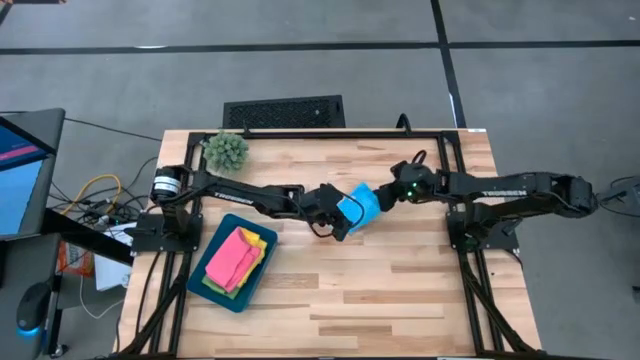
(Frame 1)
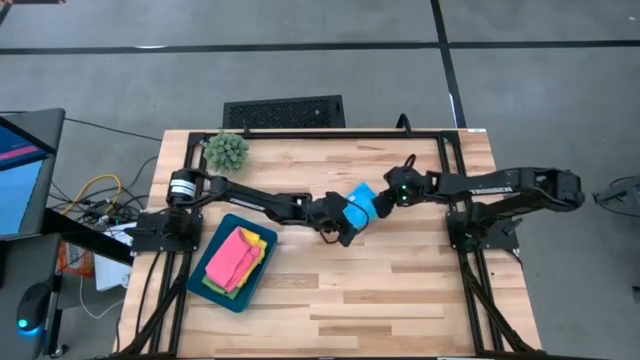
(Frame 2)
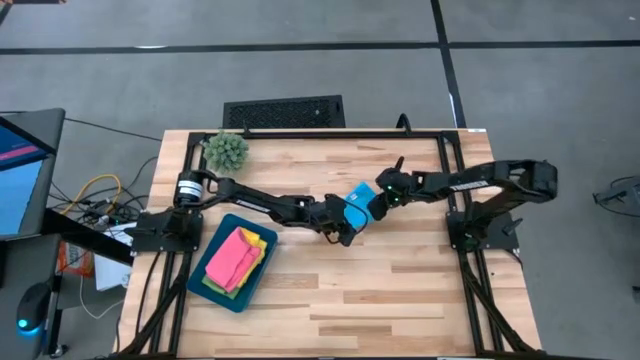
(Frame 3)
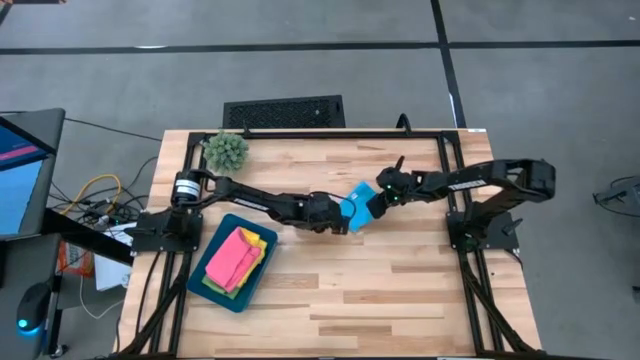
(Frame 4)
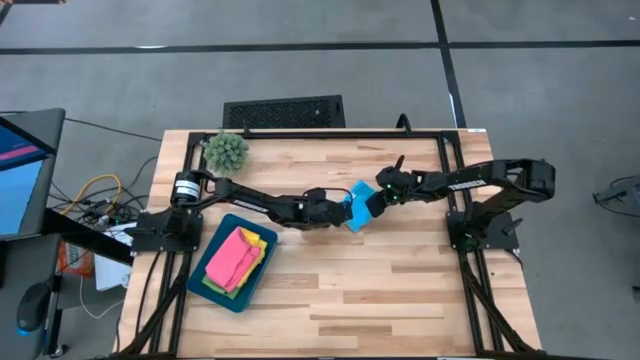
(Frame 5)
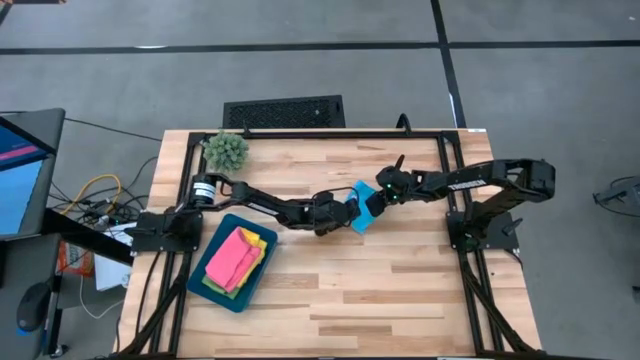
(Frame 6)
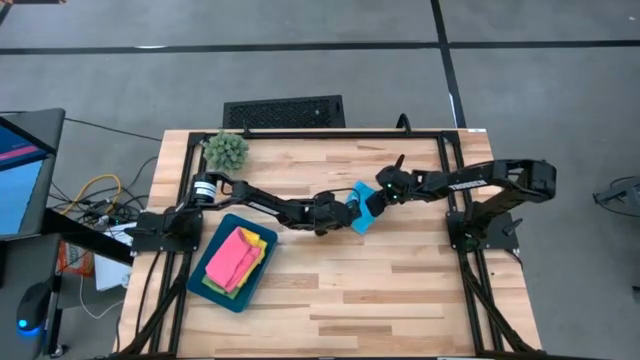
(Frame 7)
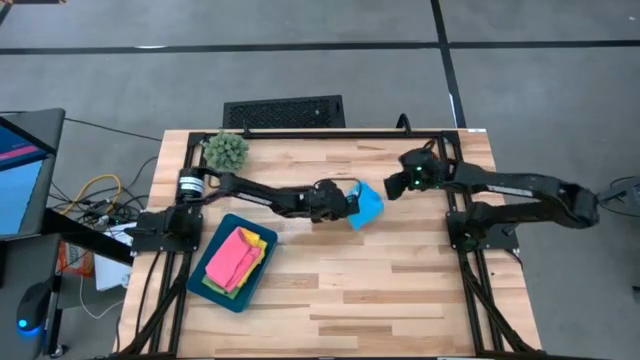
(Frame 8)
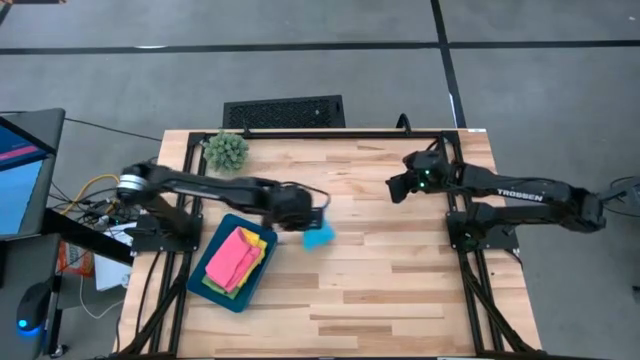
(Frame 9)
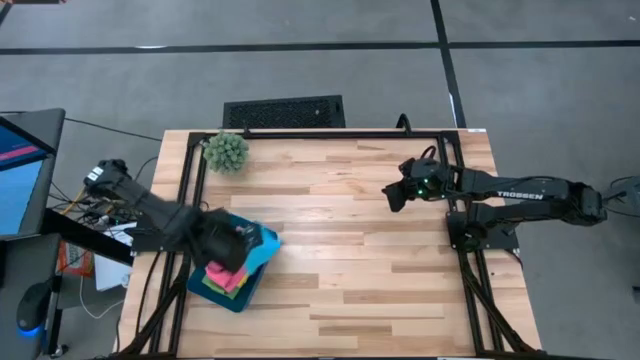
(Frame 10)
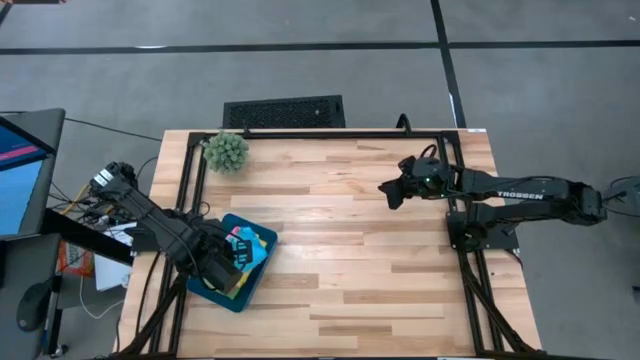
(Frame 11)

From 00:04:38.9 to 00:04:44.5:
Task: Fold microfiber towels
Put the blue microfiber towel into the blue bin

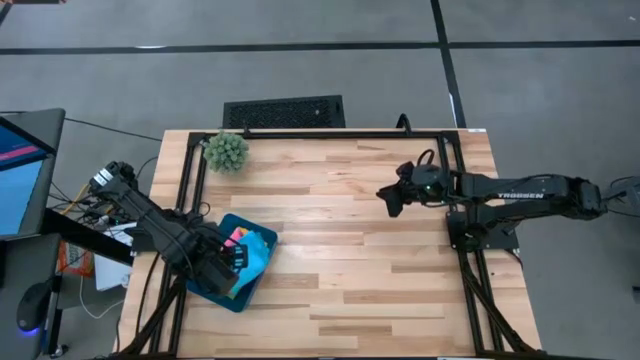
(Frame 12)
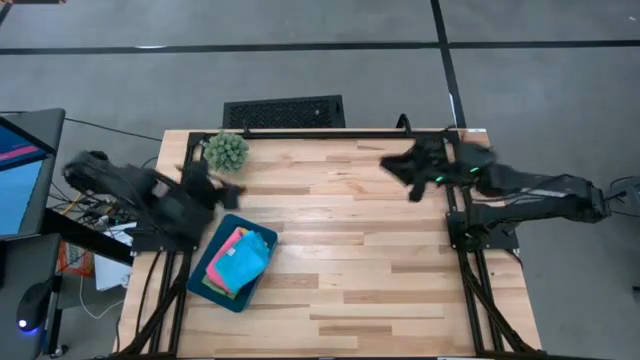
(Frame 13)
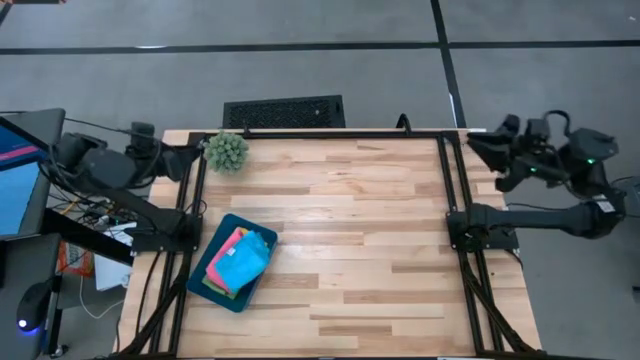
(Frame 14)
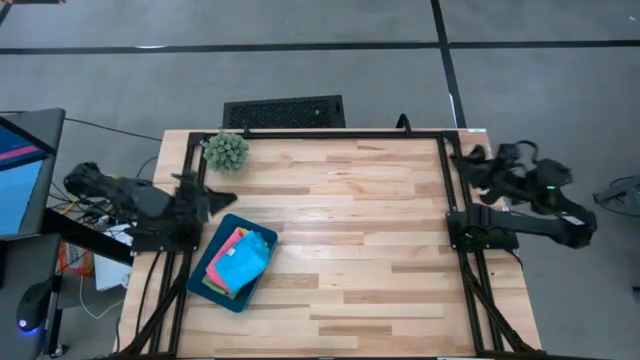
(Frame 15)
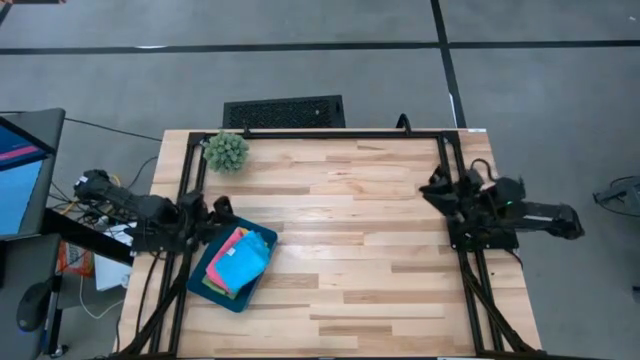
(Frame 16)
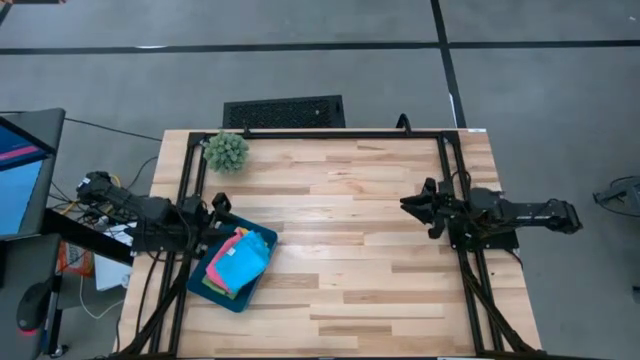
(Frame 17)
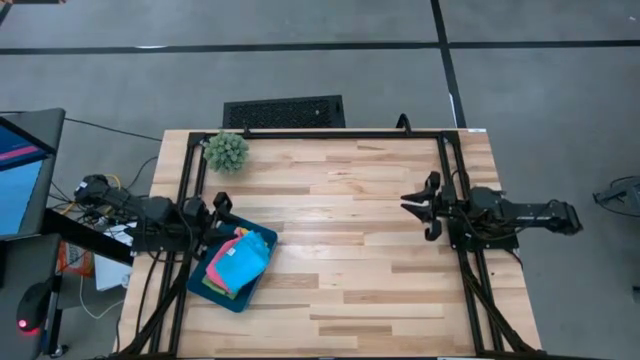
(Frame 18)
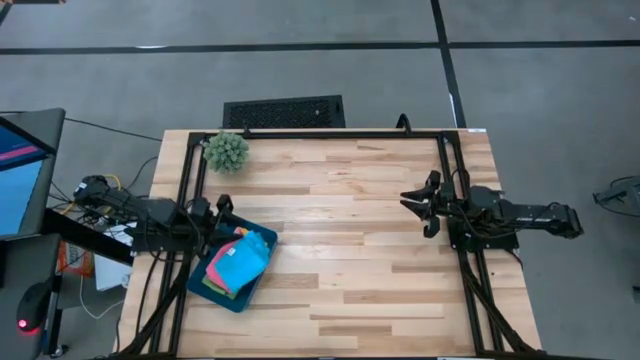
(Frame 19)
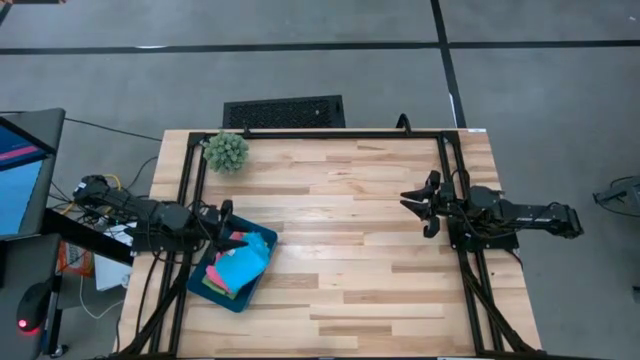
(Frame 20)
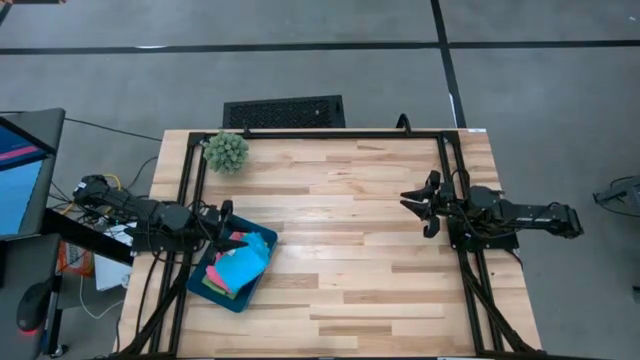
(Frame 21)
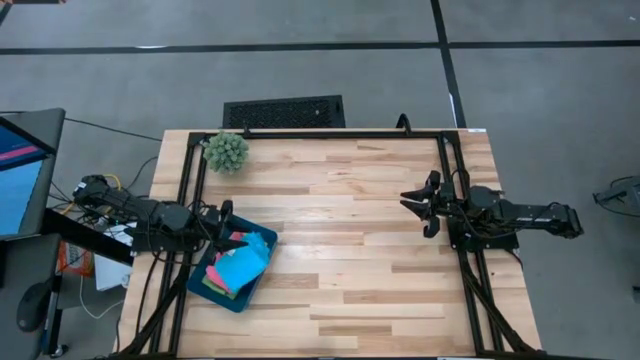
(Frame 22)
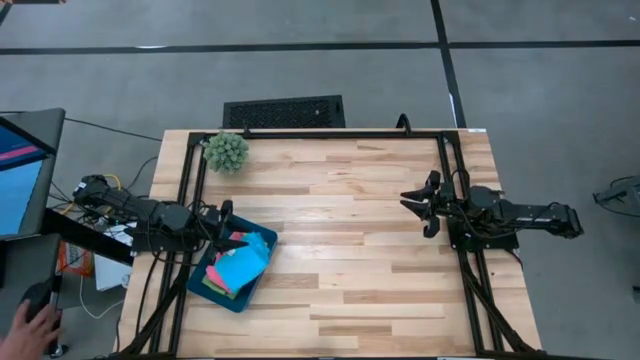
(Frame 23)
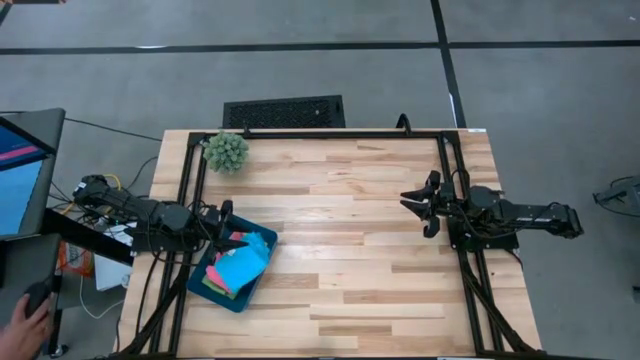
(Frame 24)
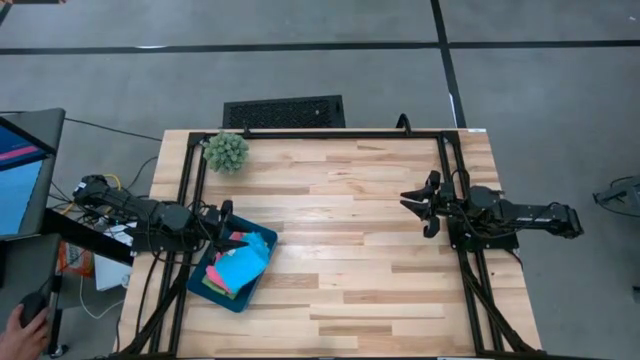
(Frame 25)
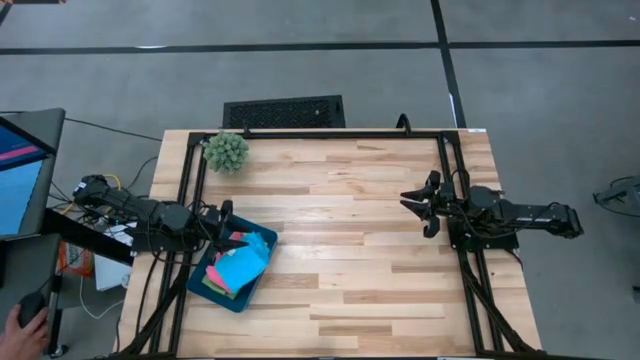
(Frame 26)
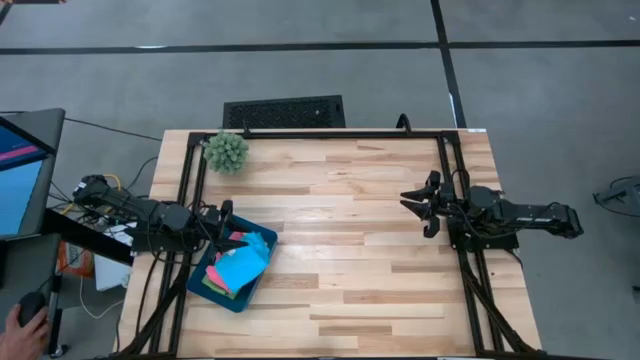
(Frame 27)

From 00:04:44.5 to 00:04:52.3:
Return to Home Position

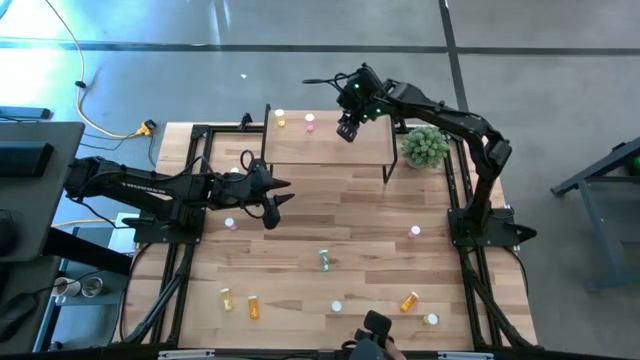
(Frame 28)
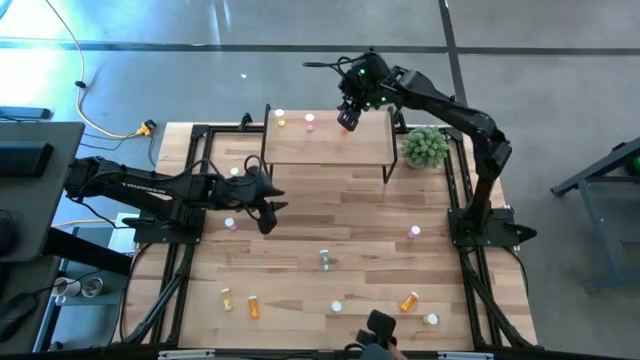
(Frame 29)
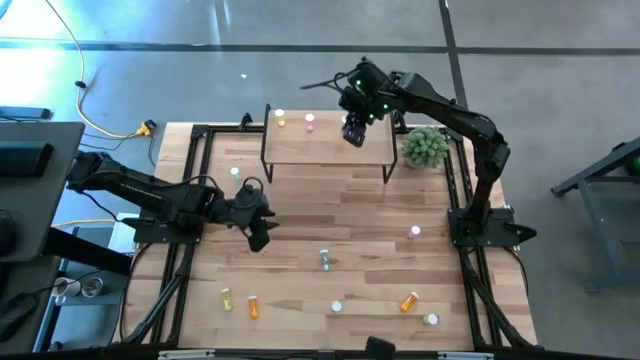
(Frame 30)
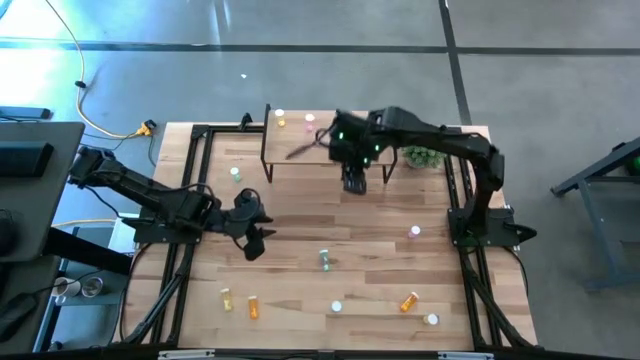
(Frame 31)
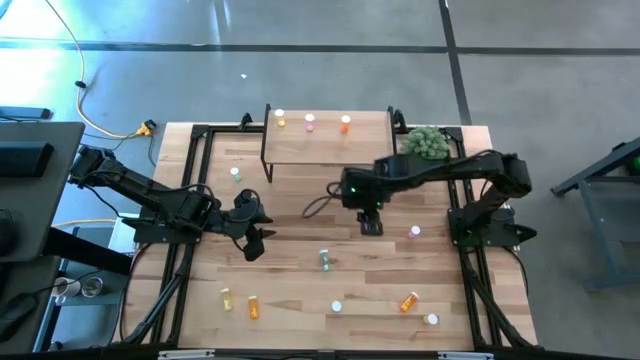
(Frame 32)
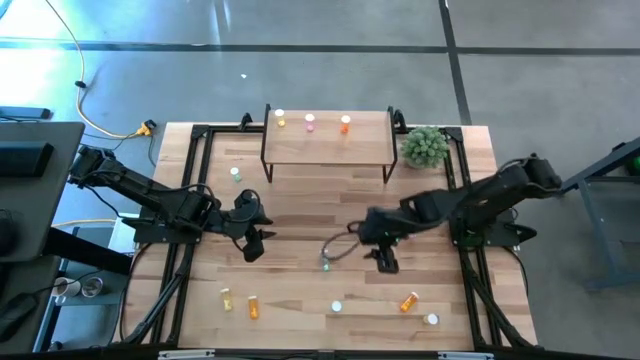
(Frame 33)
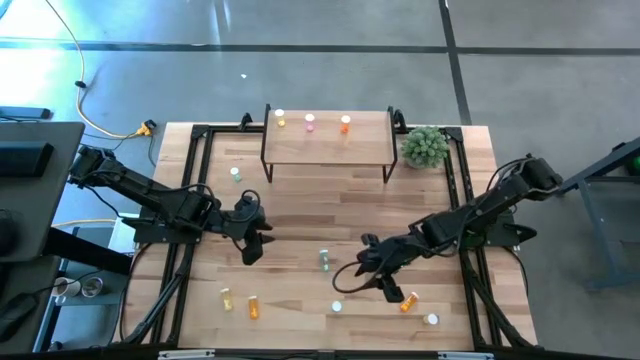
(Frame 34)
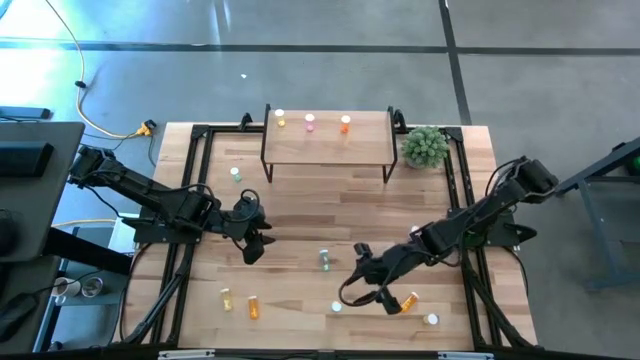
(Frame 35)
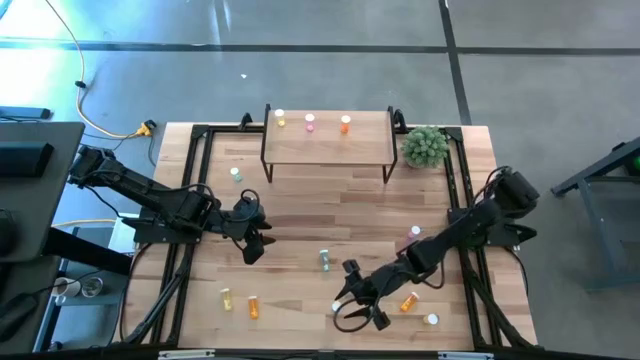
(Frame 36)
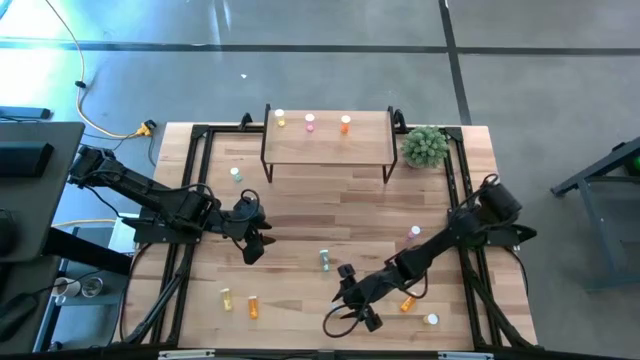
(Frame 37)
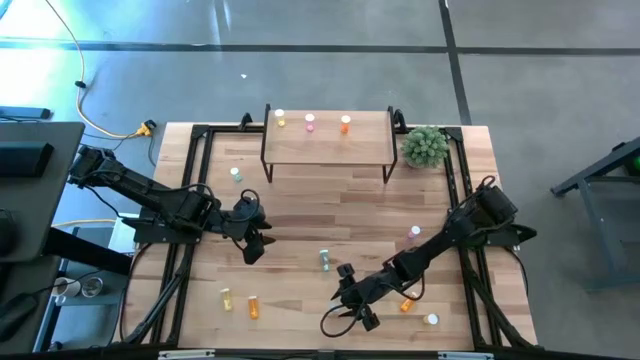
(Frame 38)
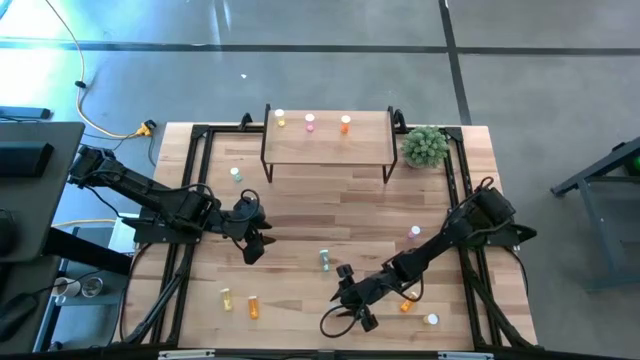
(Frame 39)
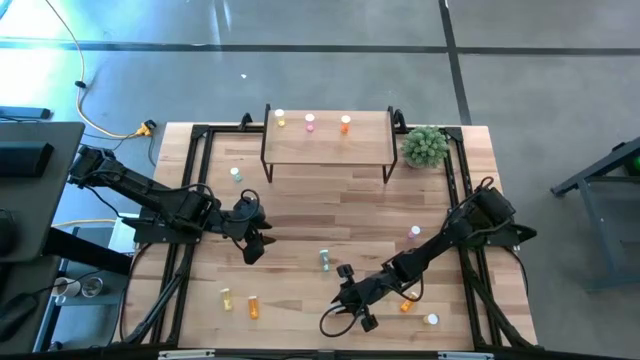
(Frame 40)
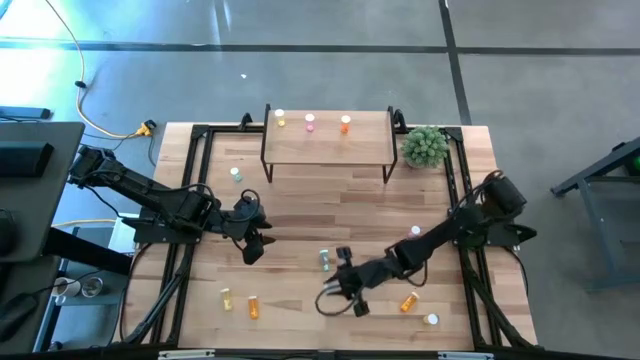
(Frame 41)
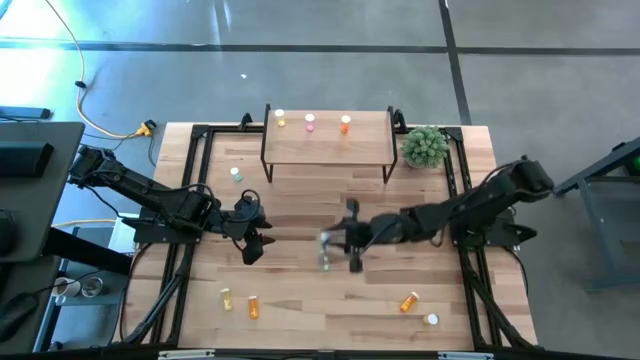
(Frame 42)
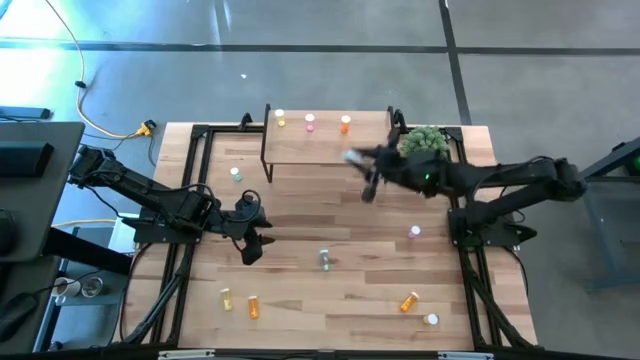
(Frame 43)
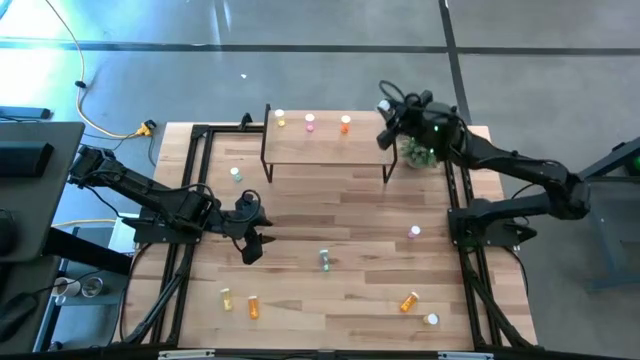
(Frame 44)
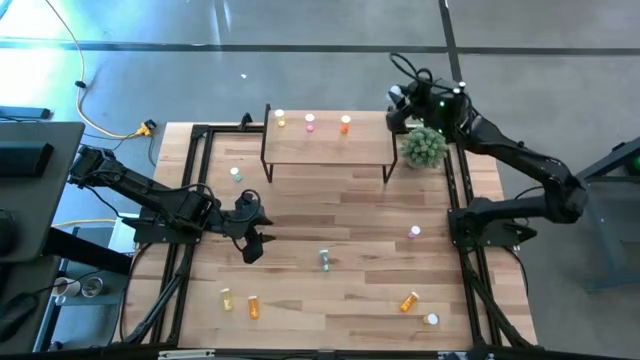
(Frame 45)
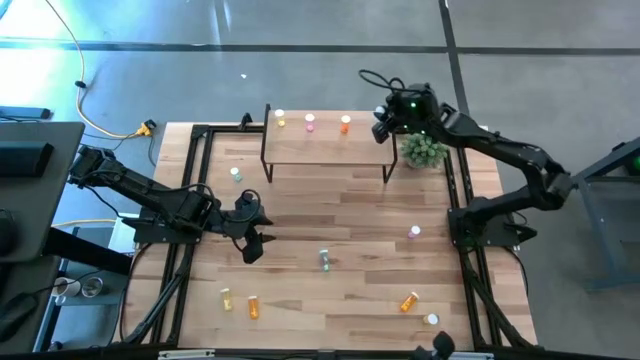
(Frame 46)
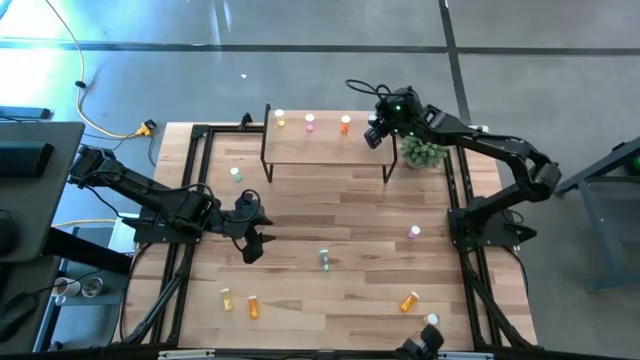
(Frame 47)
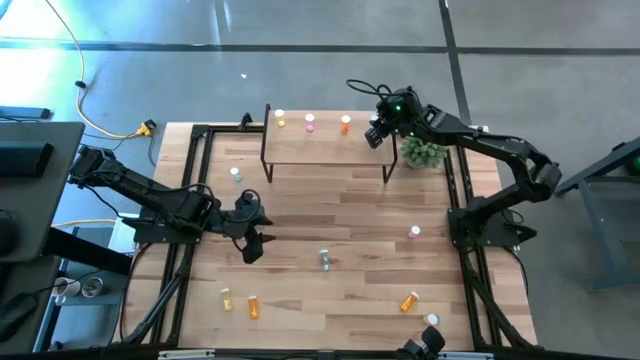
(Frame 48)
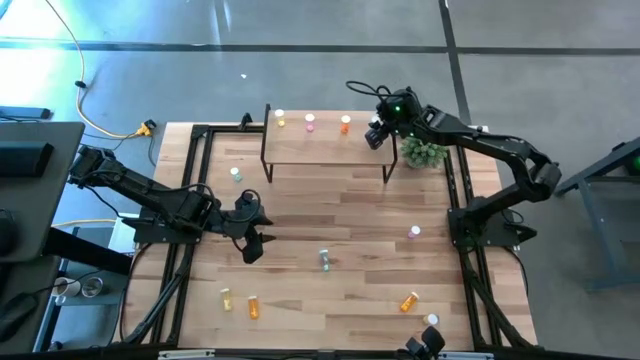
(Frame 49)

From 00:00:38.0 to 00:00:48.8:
Task: Pick and place medicine bottles onto shelf by color
Put the bottom blue pill bottle on the shelf
